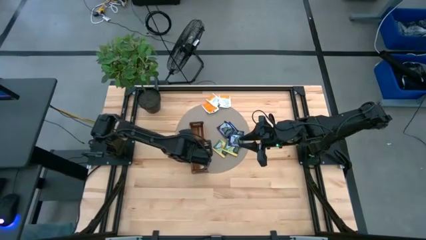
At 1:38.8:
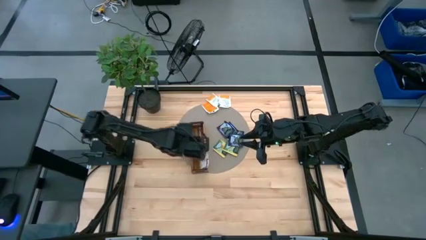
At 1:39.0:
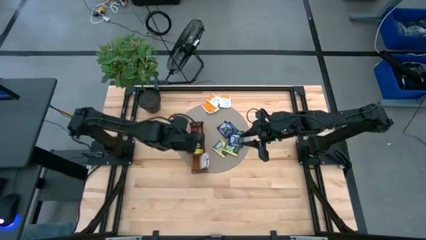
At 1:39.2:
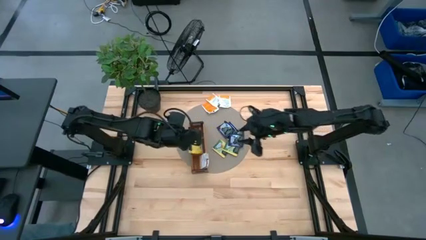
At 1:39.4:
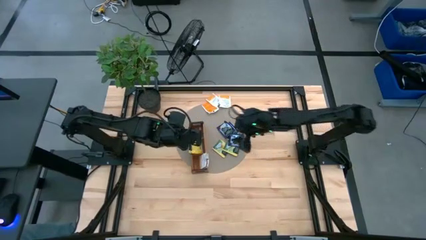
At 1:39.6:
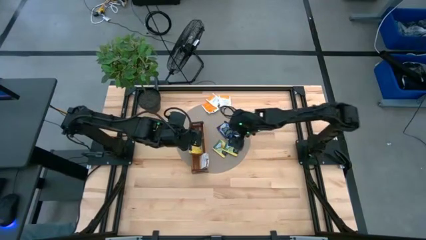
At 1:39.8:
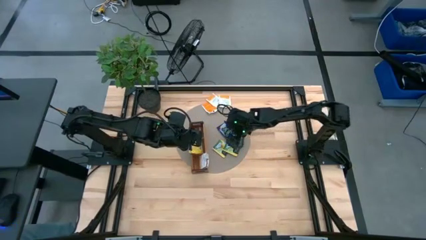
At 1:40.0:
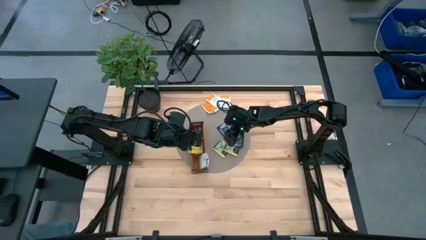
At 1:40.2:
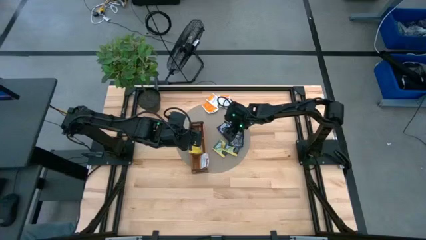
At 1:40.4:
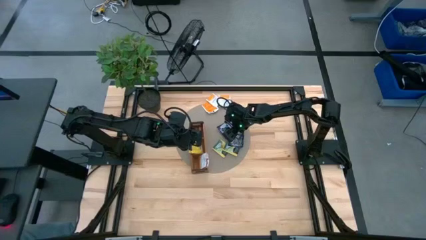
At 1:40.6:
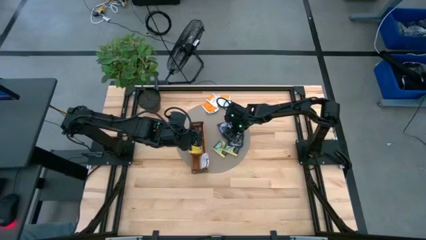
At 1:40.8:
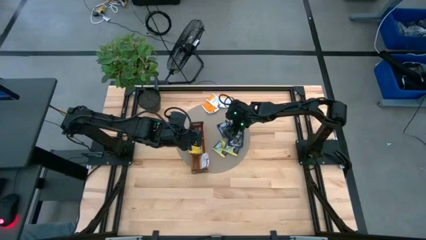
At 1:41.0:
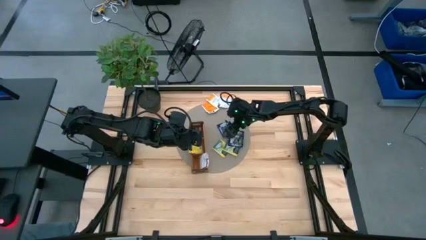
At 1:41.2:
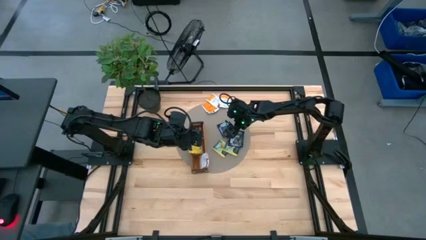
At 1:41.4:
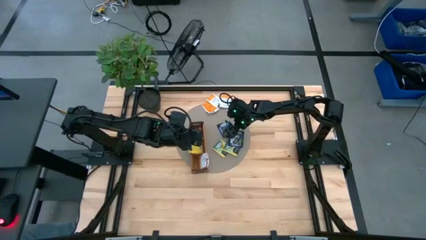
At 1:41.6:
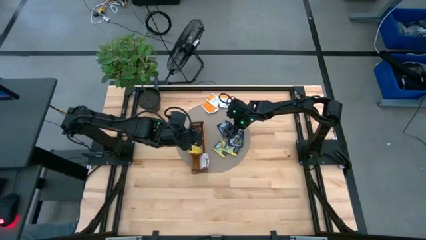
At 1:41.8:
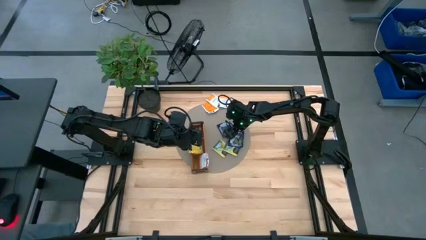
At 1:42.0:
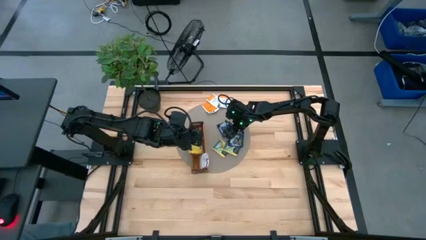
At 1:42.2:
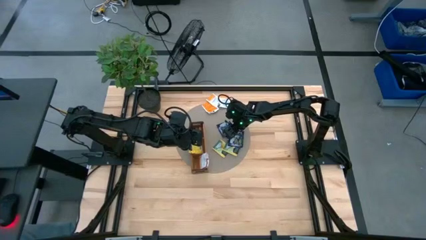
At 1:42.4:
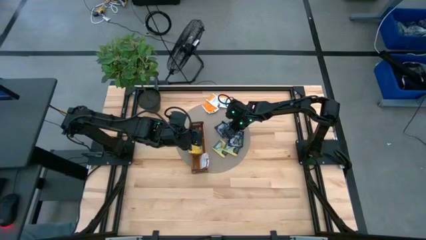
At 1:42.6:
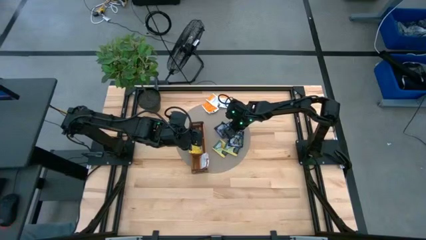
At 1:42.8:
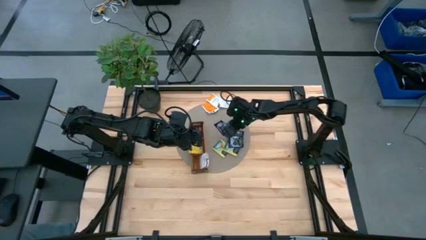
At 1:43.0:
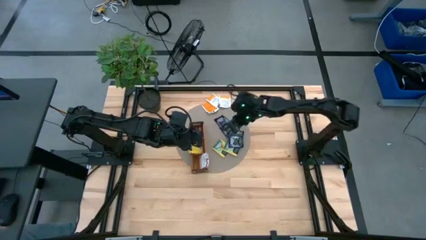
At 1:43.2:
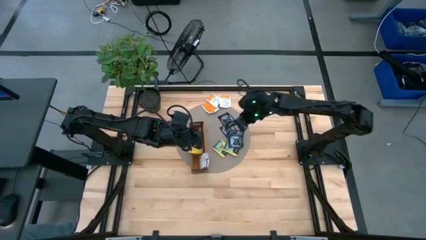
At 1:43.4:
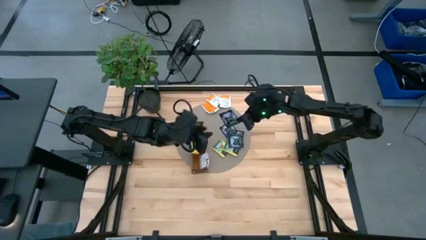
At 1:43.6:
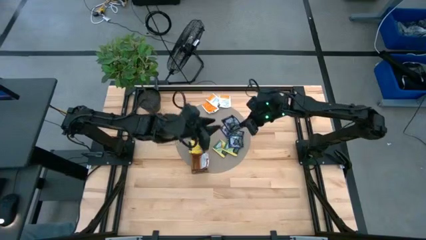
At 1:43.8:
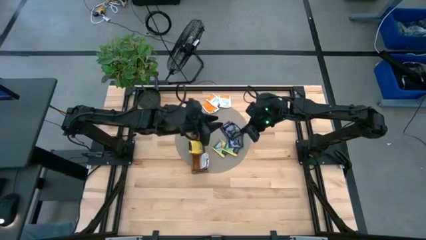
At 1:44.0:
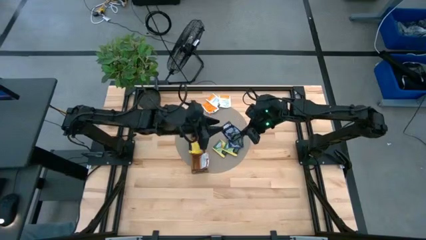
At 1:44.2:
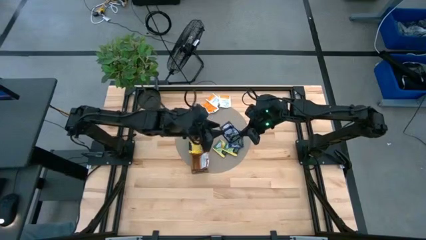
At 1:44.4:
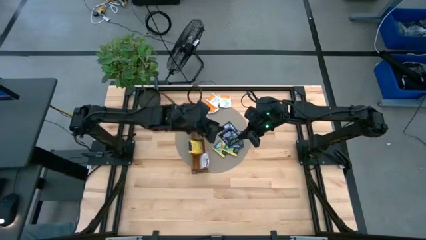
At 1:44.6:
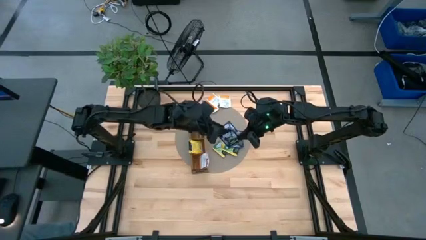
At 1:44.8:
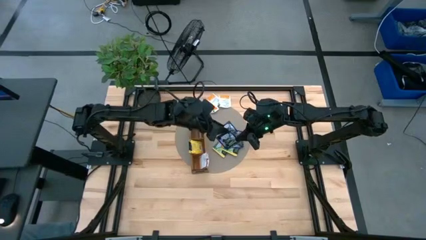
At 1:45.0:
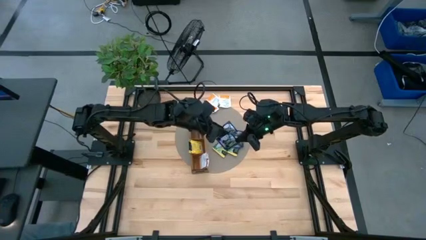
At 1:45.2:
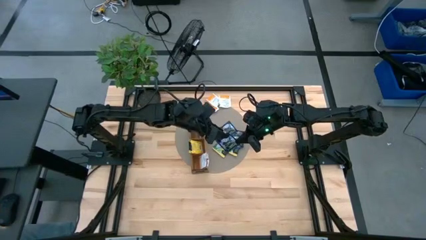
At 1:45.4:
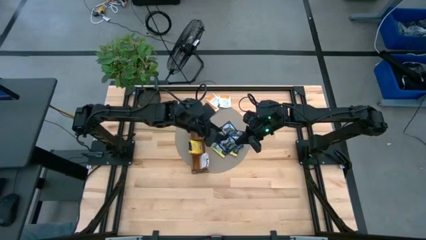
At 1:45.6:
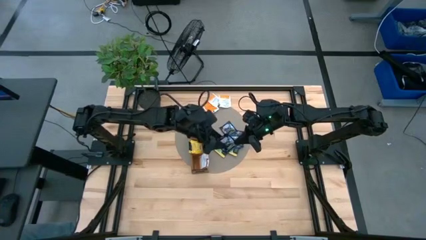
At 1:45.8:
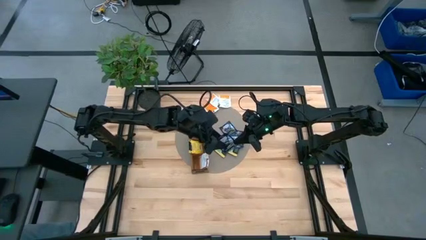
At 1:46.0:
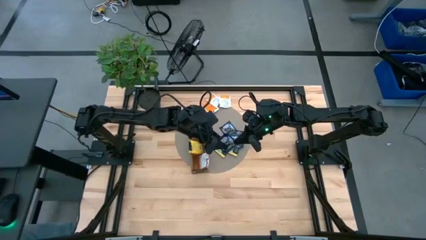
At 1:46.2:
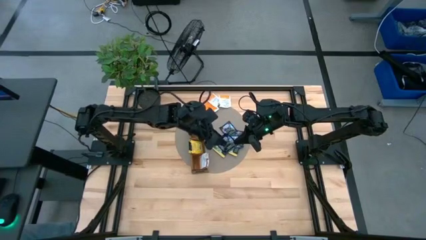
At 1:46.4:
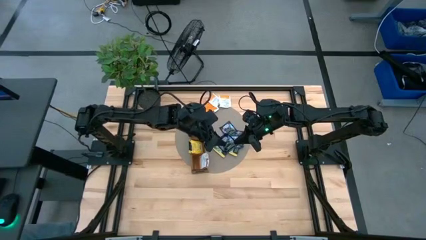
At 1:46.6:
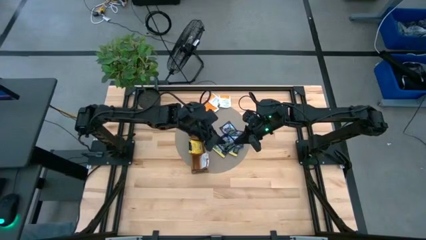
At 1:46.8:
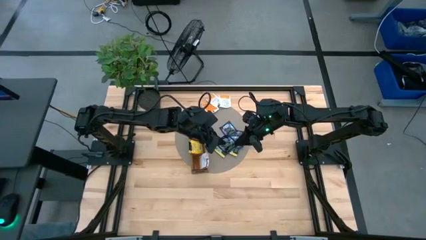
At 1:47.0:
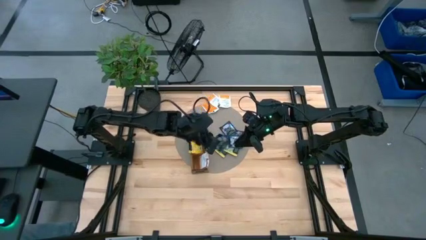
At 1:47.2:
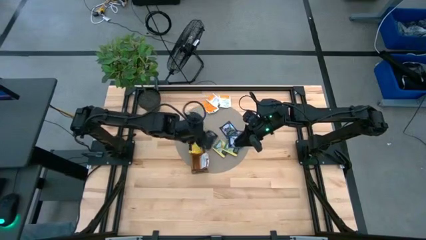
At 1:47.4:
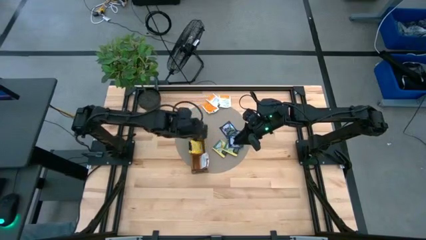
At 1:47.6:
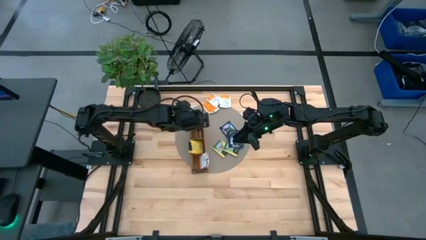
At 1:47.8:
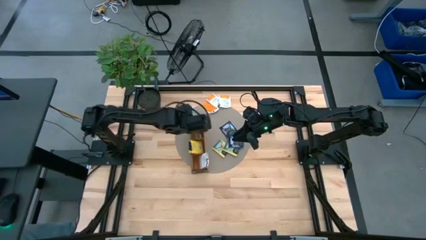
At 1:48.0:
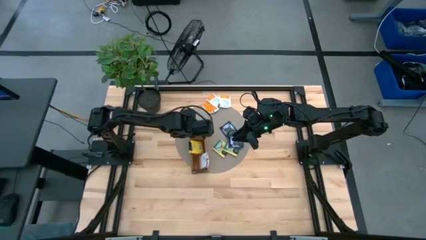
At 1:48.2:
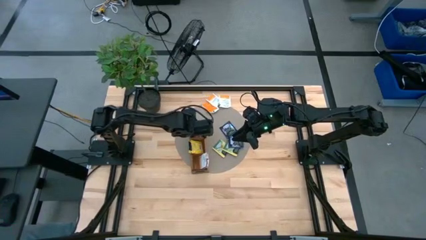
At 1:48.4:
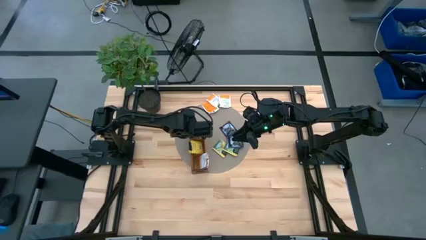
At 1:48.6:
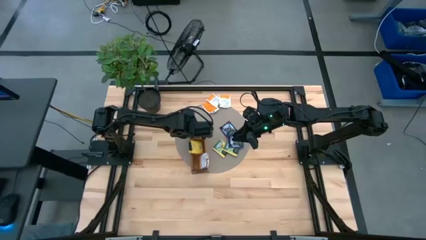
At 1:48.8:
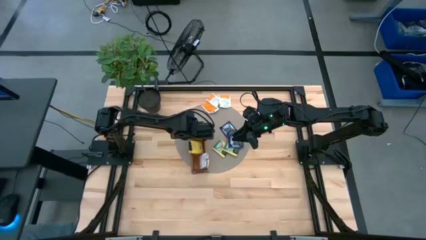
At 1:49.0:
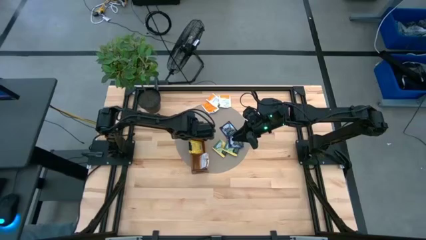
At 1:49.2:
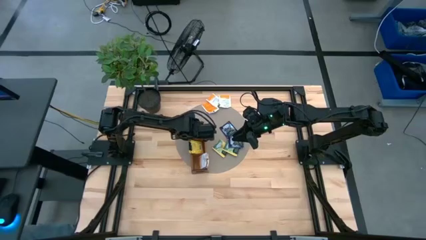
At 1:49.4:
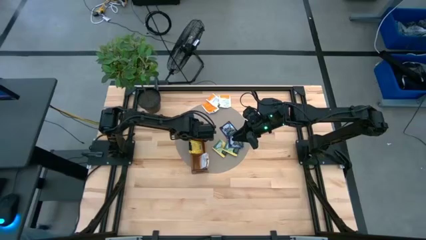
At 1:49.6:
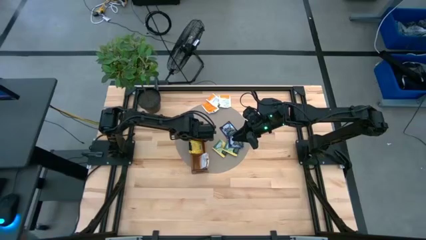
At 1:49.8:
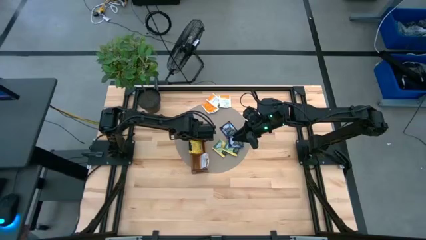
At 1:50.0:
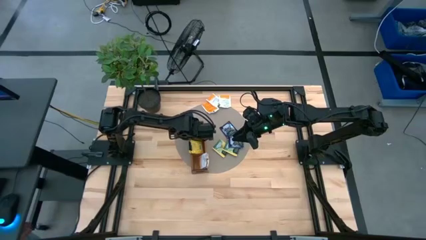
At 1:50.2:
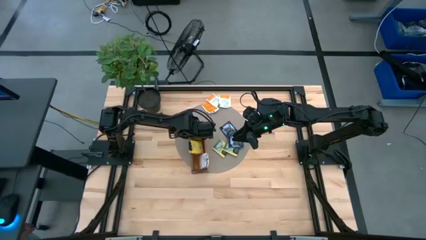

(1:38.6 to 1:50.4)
Task: Pick & Place Tea
Put the violet tea bag into the top section of the wooden organizer
